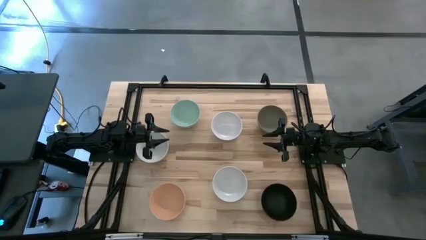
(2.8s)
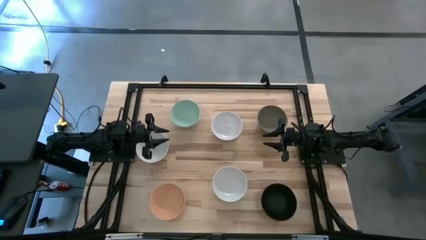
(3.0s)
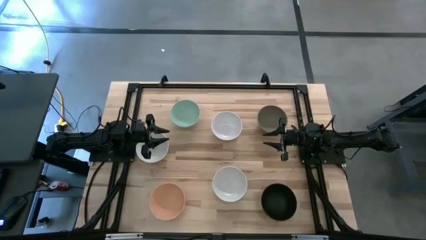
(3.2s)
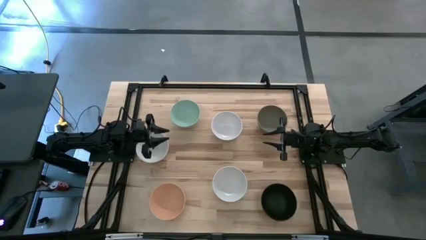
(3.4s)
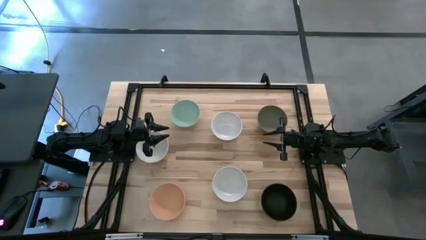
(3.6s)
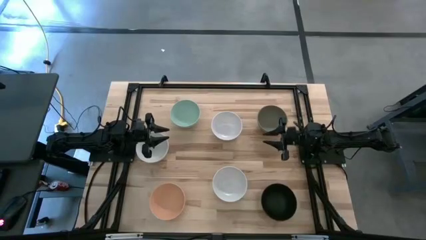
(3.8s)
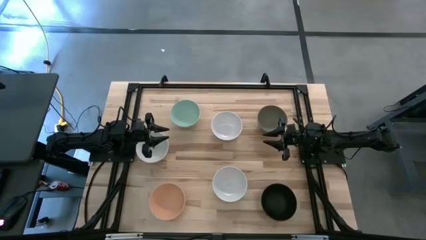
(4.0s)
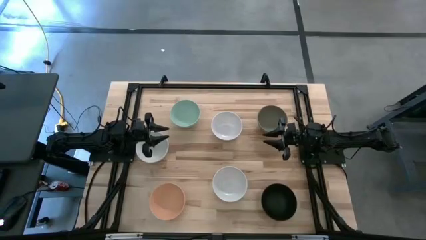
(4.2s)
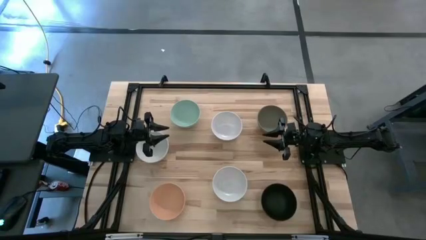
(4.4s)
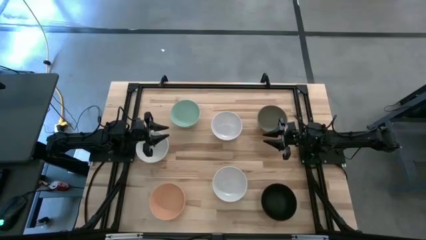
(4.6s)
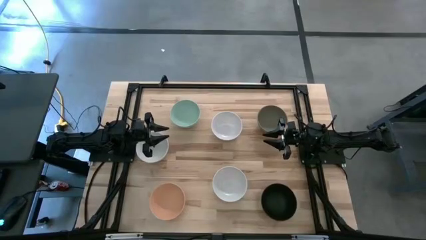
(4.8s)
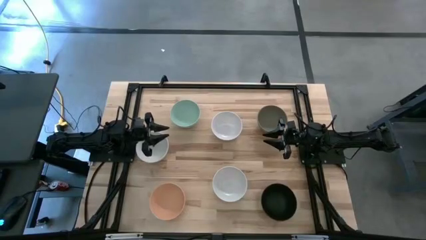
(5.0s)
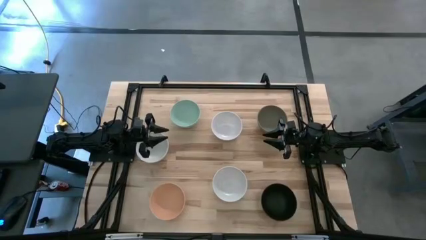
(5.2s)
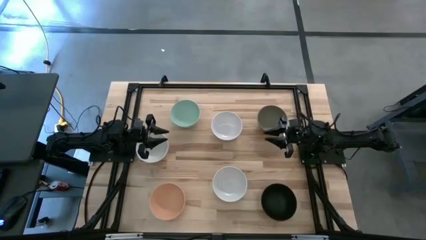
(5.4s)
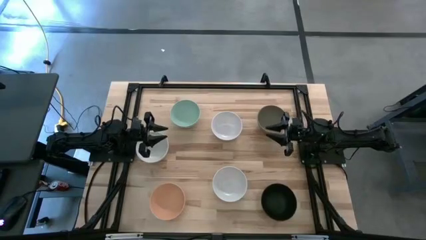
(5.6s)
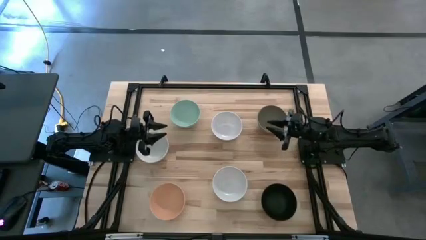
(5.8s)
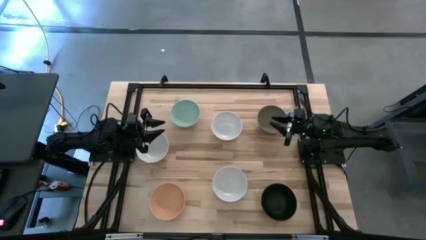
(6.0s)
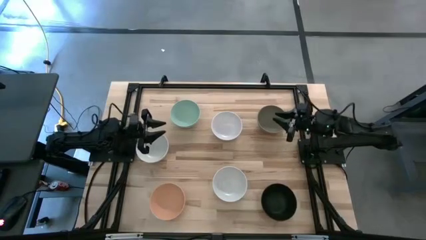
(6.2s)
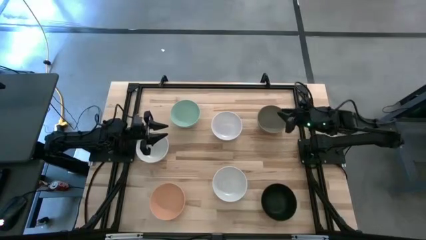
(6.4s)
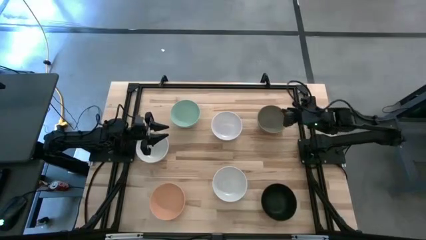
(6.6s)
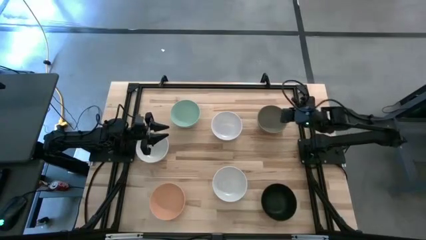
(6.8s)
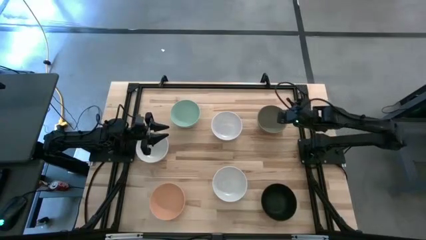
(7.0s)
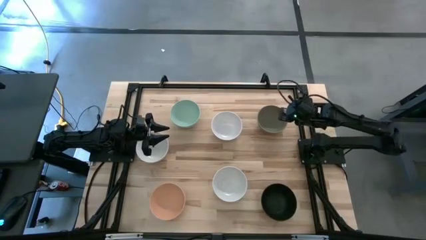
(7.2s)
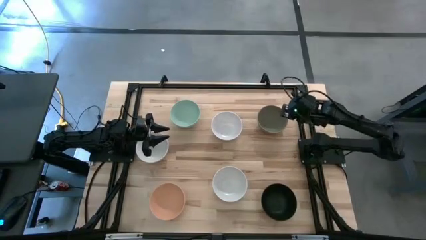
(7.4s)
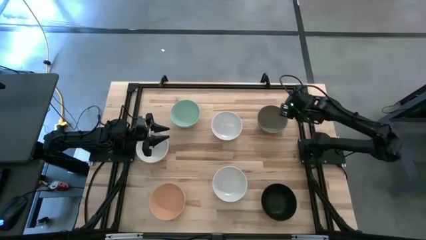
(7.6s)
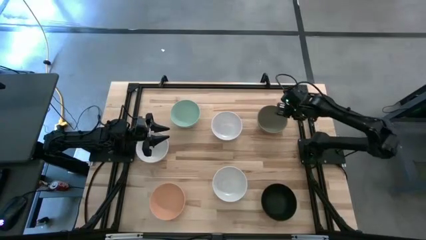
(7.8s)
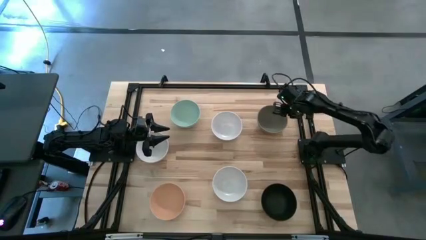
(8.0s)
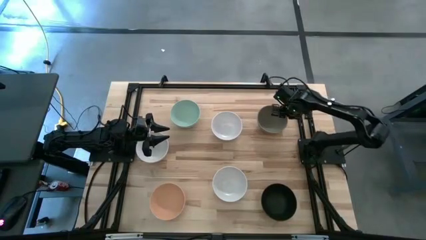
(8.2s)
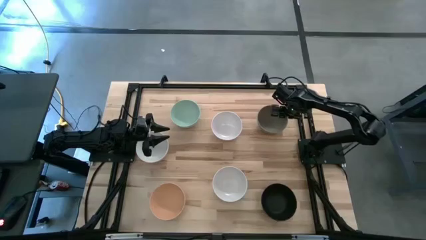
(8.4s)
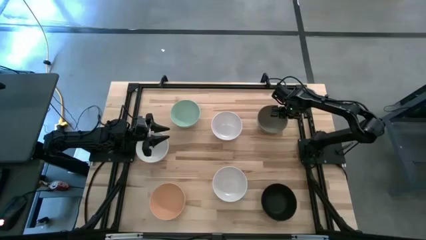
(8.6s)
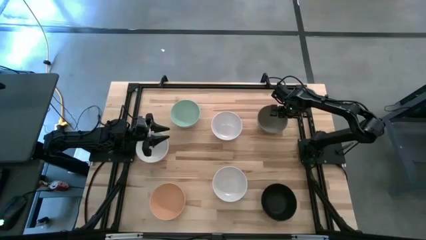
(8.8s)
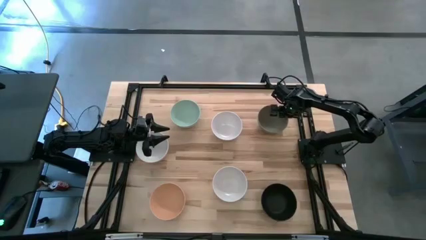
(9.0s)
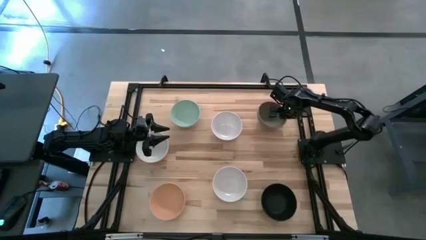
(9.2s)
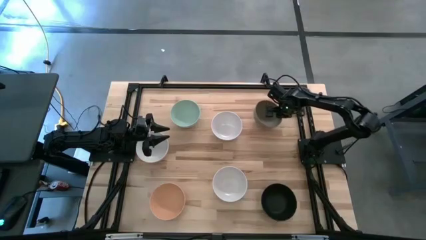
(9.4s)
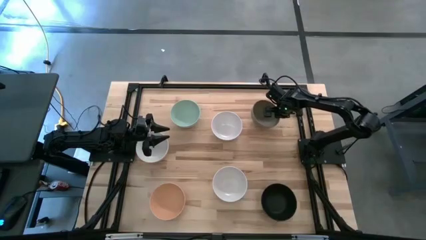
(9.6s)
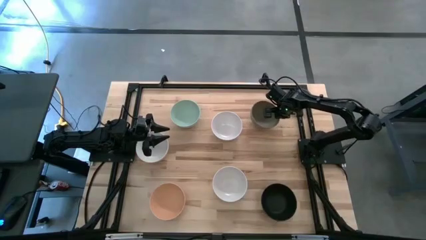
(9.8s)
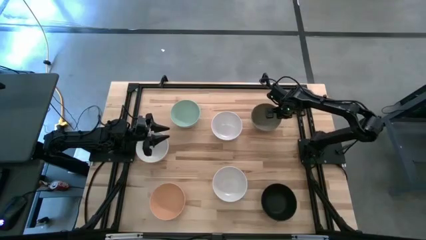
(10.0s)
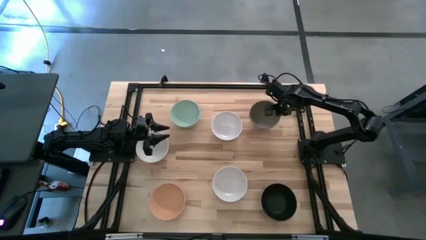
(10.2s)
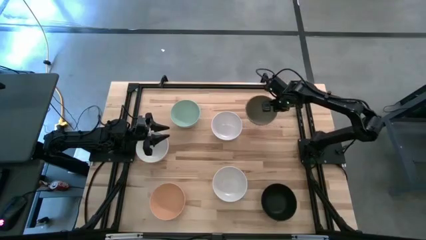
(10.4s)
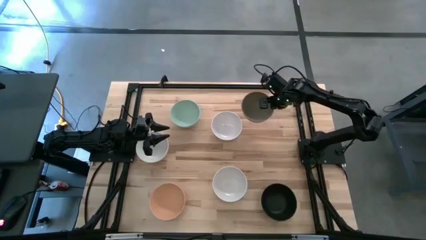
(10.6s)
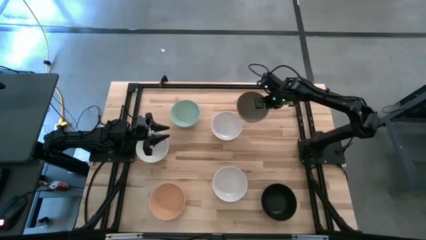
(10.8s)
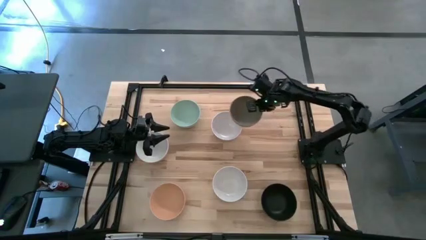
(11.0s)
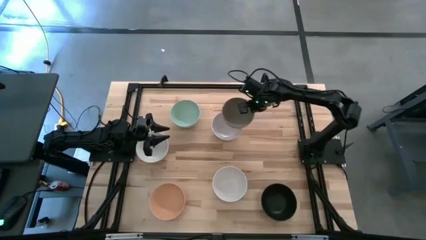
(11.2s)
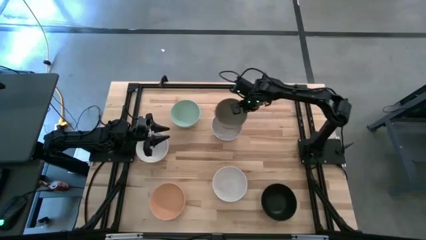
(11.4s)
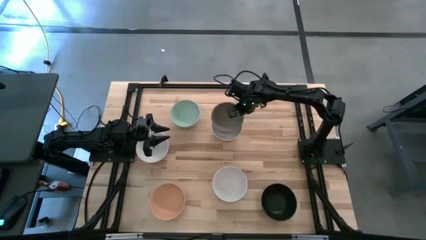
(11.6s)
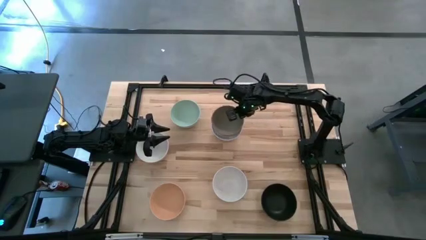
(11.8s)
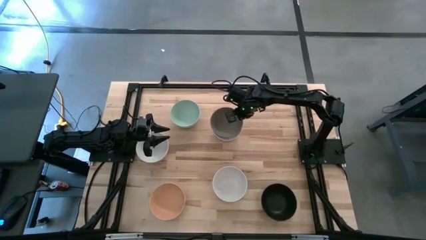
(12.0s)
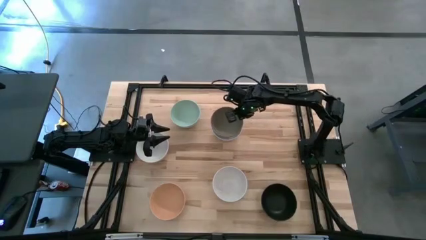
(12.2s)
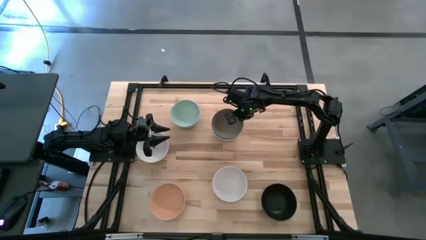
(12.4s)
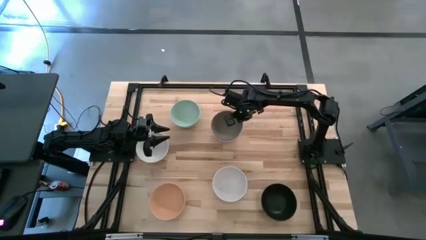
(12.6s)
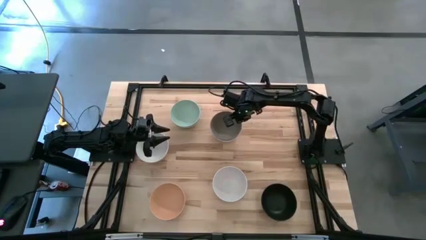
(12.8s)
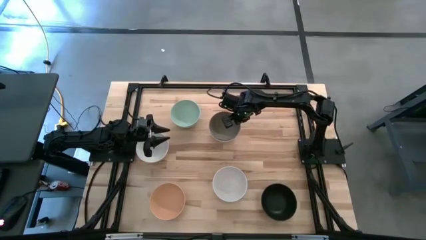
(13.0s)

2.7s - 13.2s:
Task: Nest bowls inside each other
Stack the gray bowl on the top right white bowl

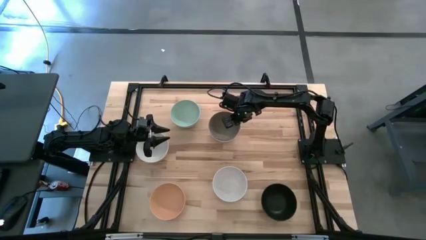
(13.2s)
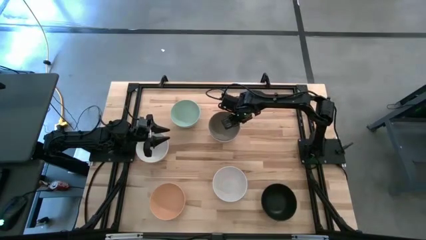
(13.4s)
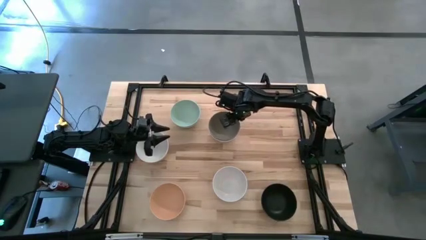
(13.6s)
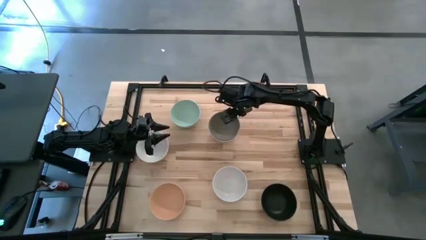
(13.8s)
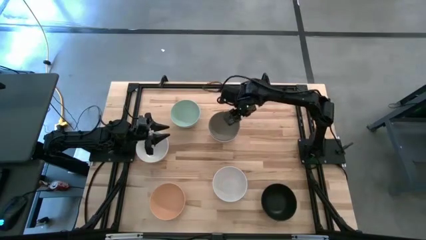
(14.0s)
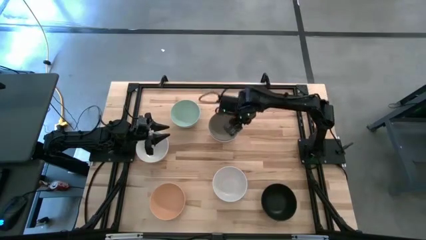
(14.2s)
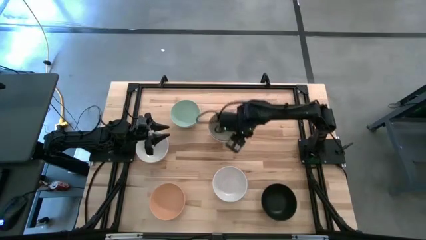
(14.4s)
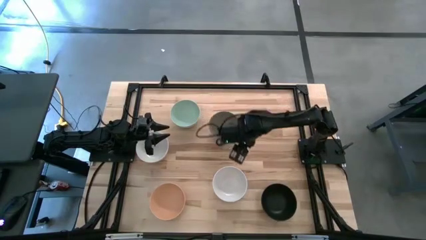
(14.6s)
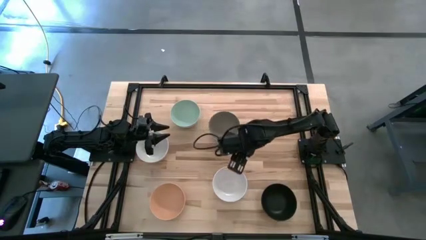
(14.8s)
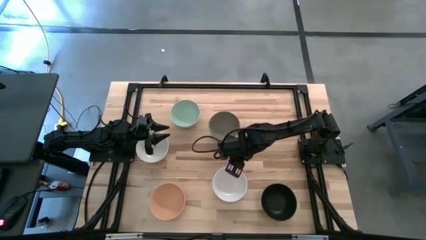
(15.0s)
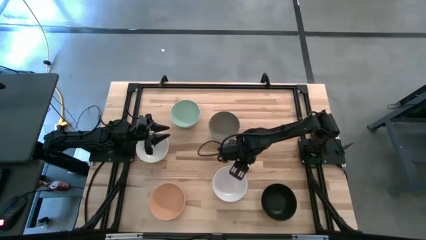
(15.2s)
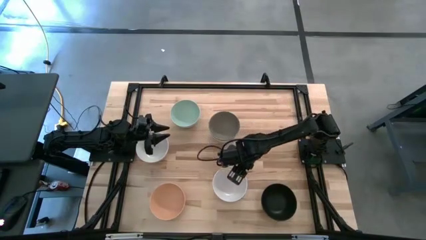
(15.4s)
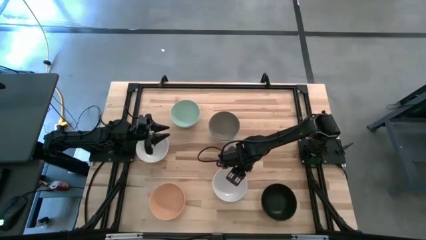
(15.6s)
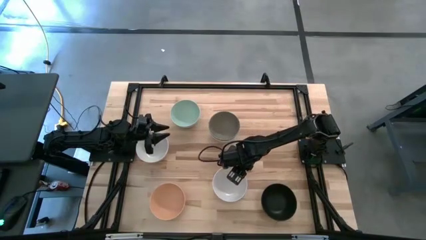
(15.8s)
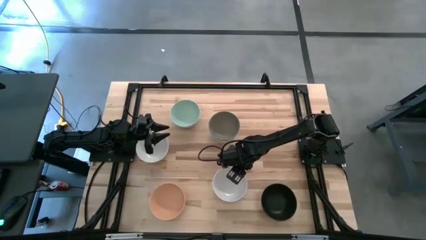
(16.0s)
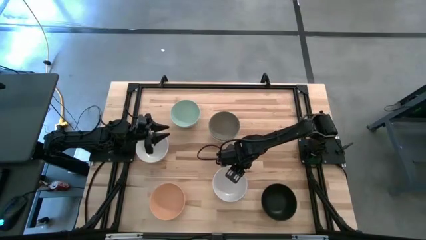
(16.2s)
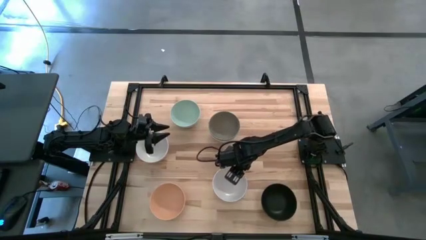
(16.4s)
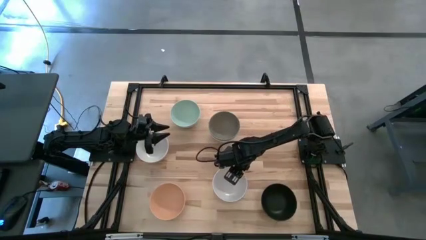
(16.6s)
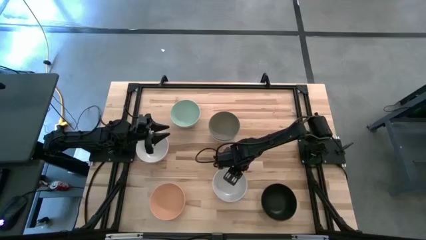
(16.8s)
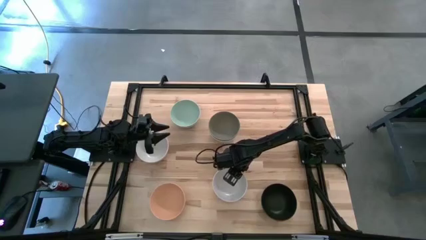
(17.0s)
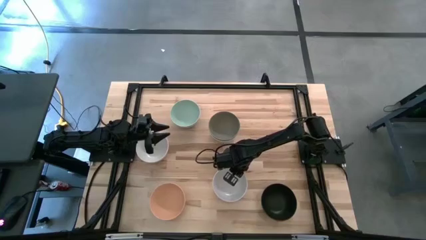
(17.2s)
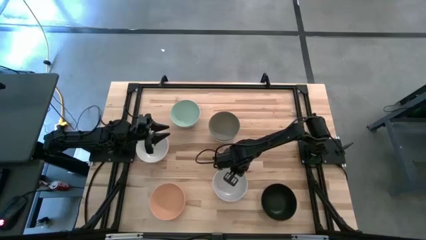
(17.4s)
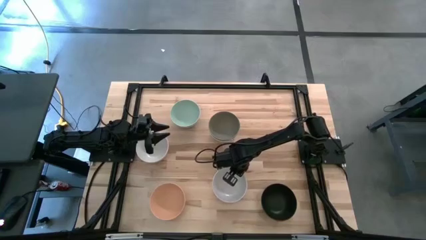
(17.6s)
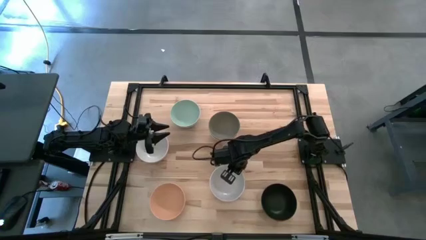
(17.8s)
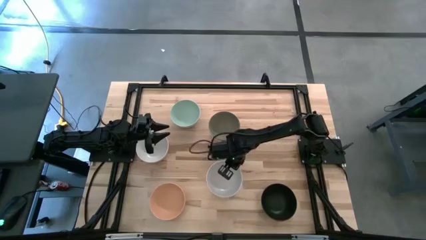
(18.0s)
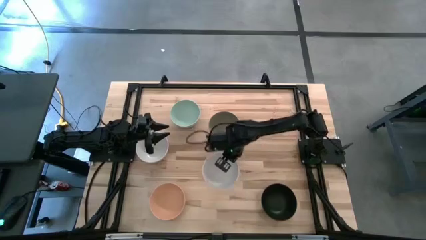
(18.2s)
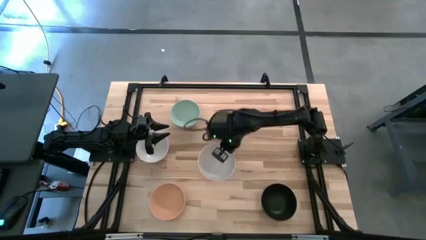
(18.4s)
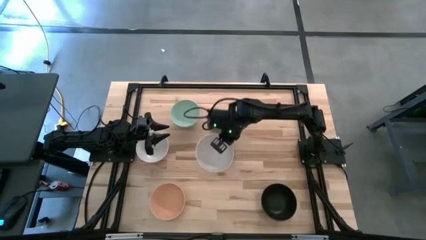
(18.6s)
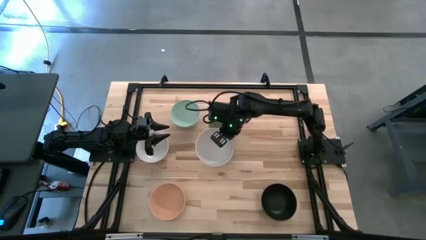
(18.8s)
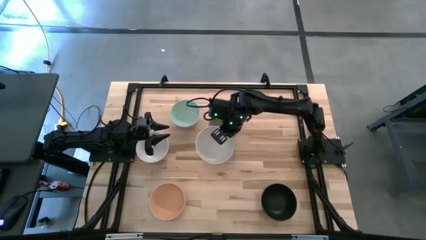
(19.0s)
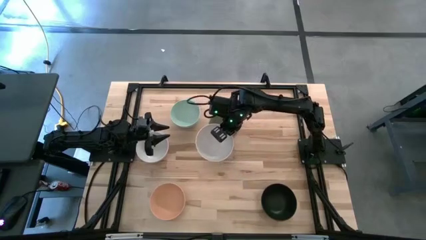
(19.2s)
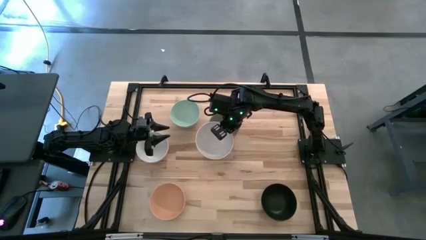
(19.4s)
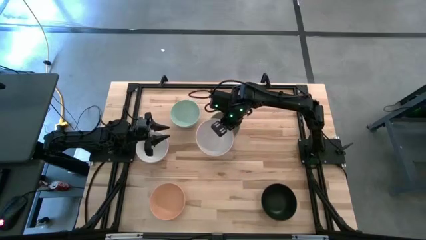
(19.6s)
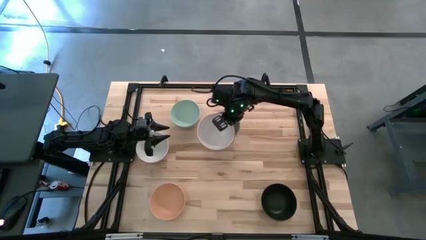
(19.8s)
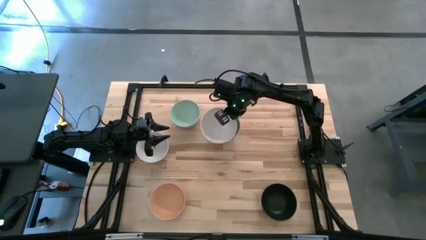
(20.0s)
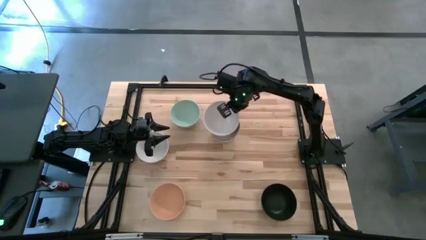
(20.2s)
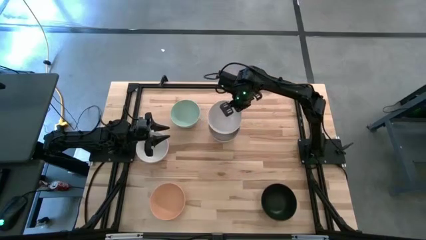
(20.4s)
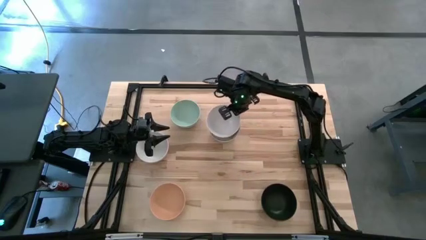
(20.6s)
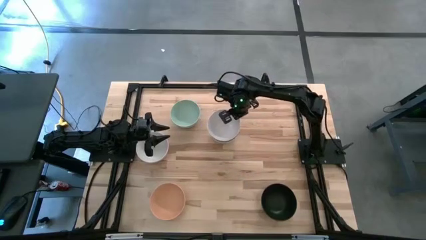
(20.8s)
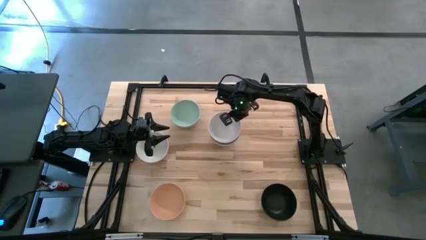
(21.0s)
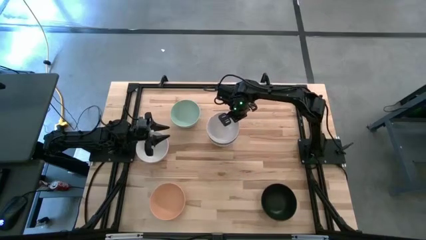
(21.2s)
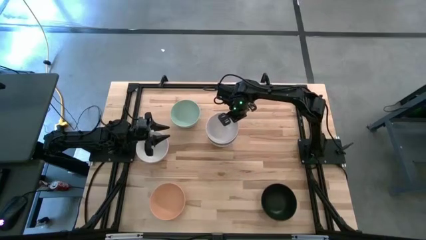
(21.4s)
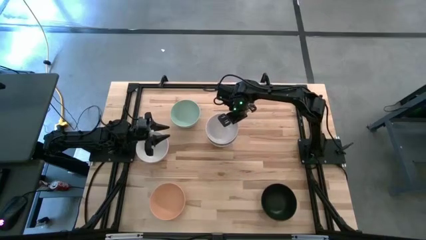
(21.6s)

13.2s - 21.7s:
Stack the bottom white bowl on the gray bowl
